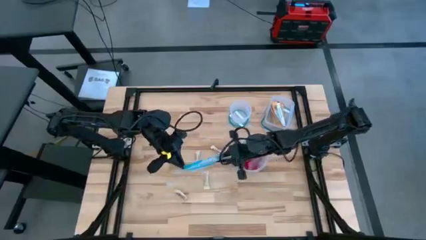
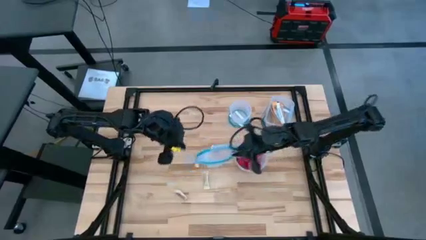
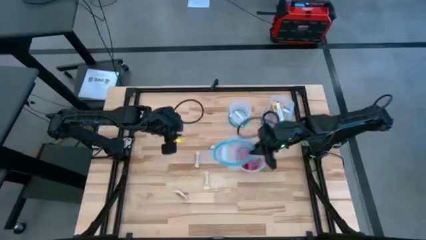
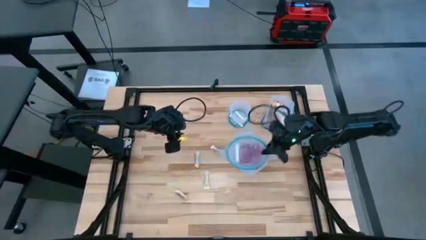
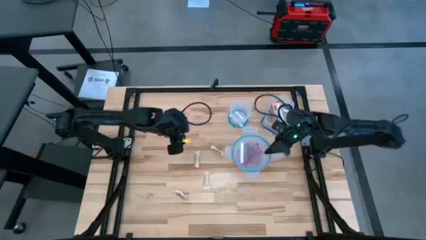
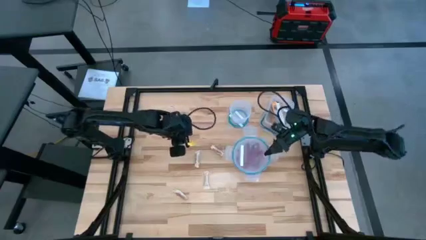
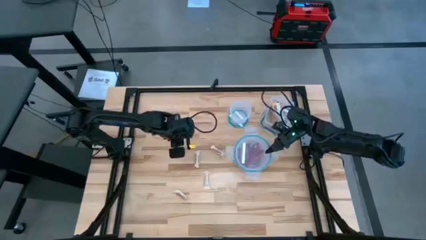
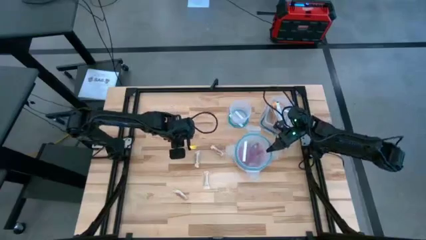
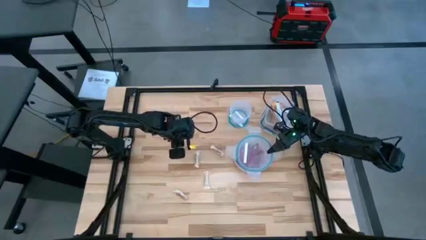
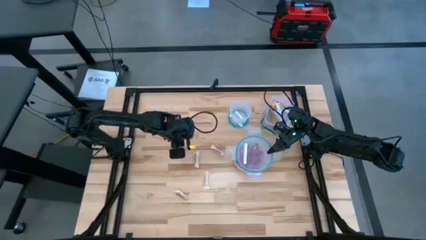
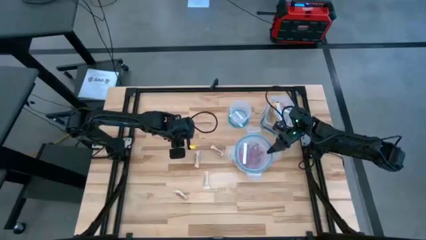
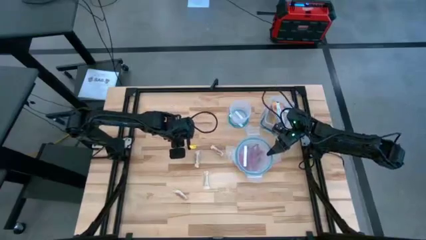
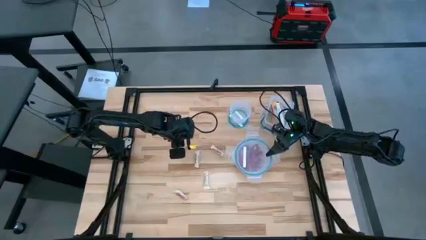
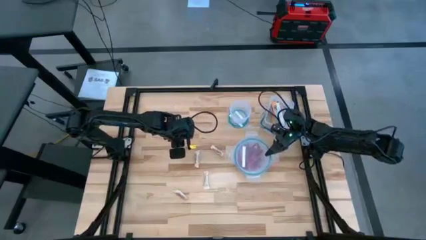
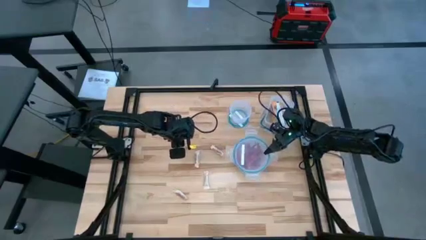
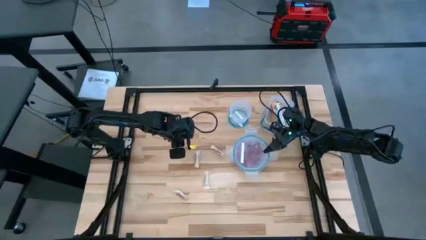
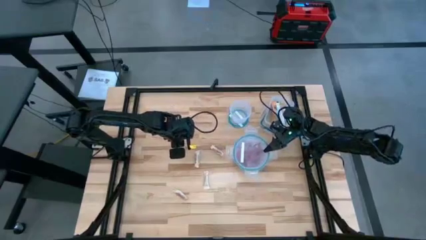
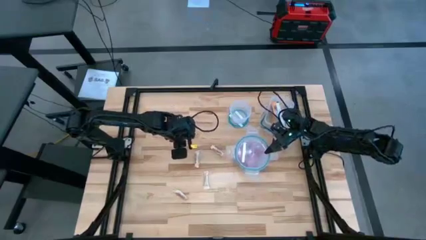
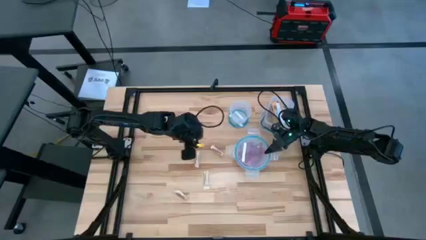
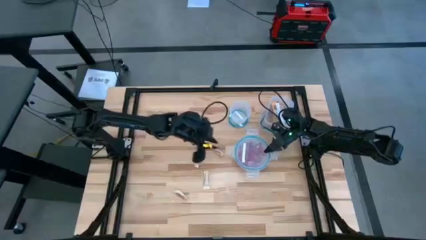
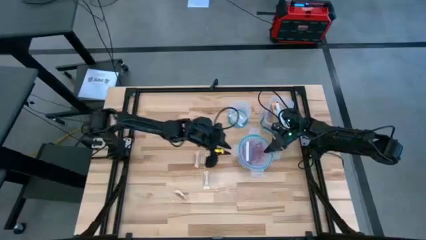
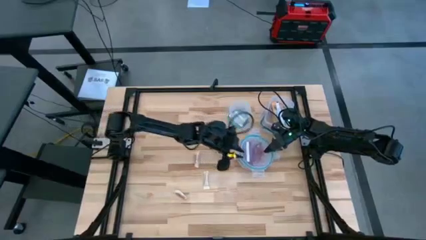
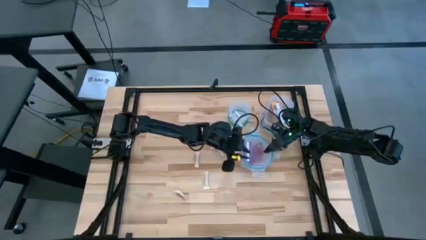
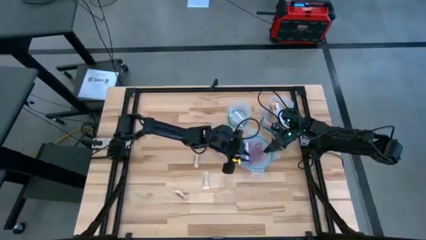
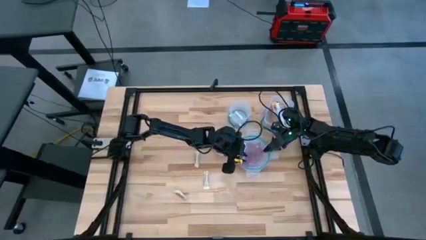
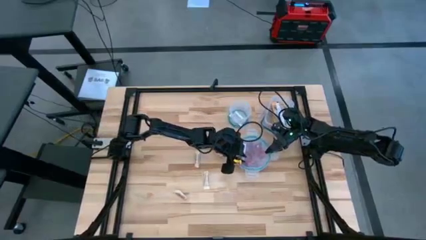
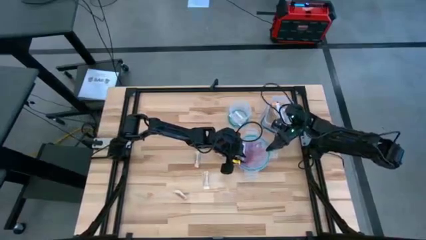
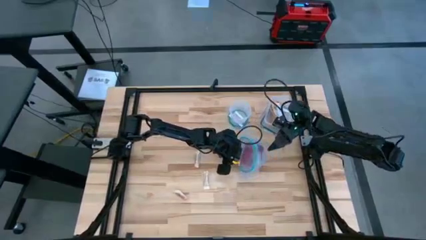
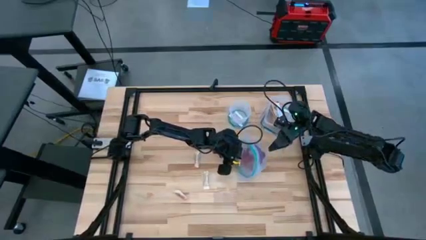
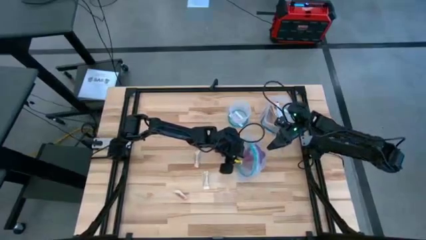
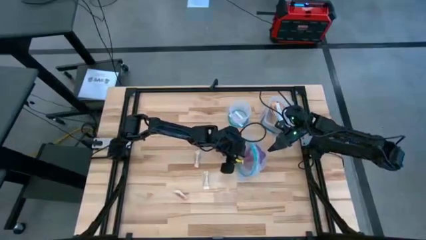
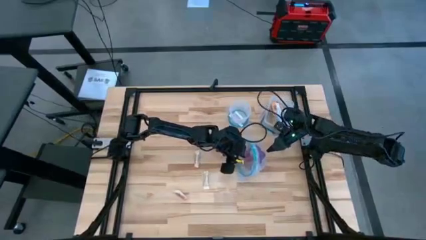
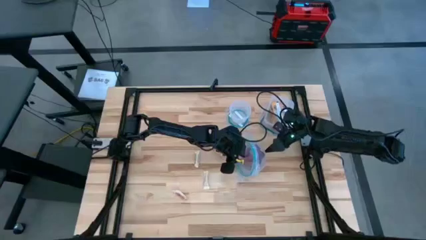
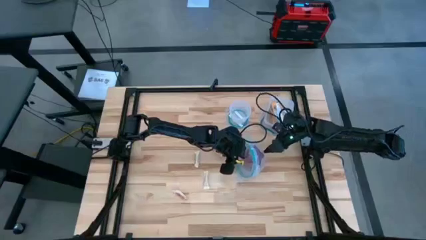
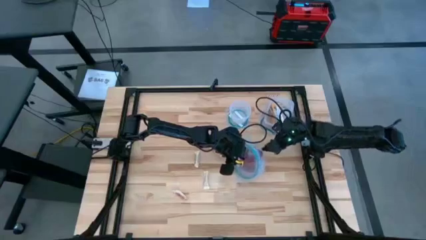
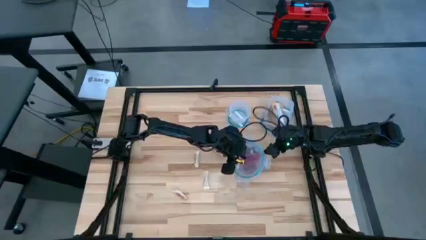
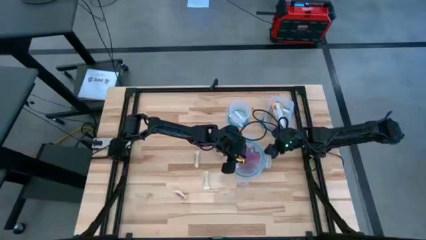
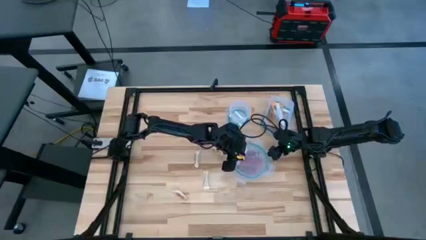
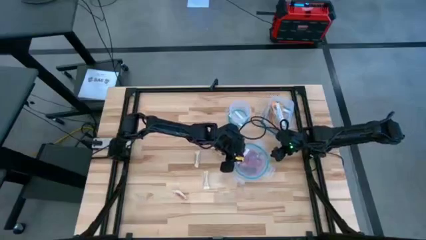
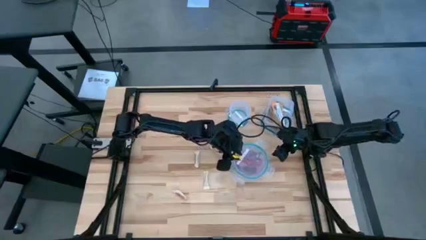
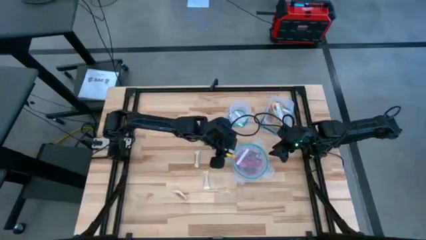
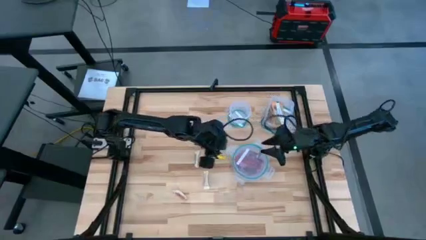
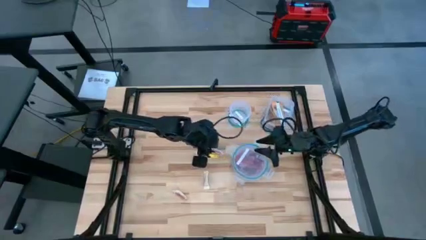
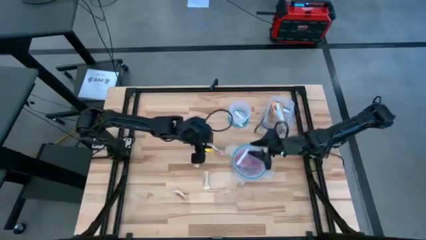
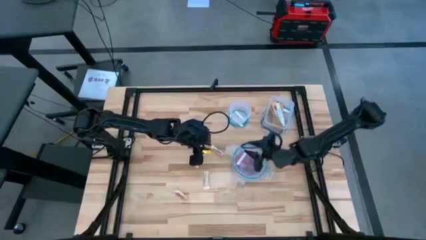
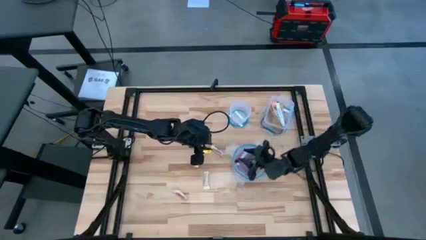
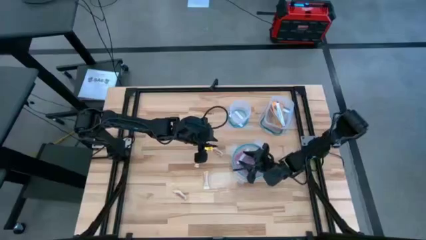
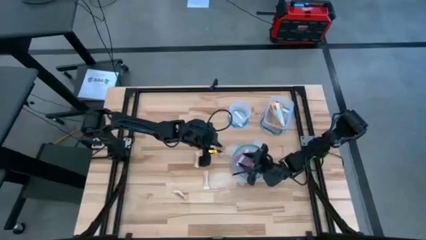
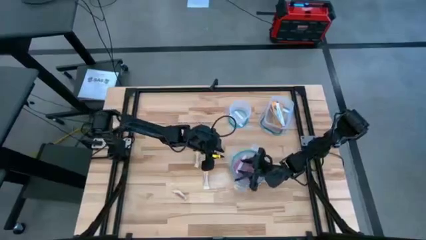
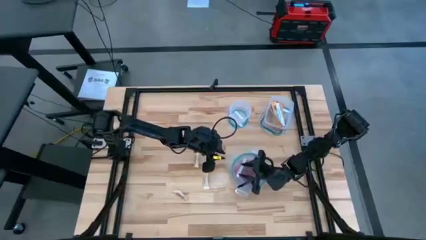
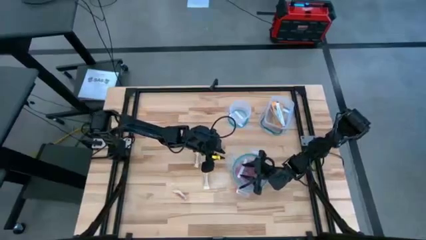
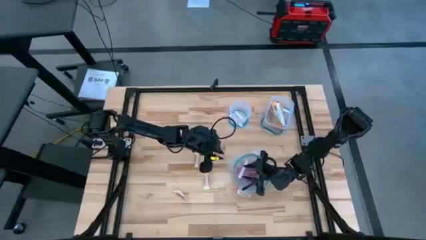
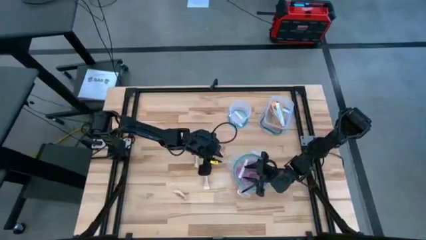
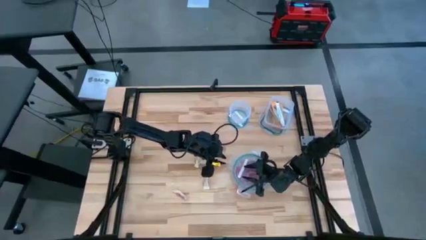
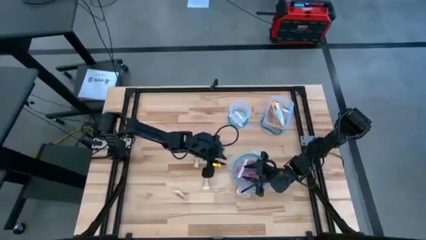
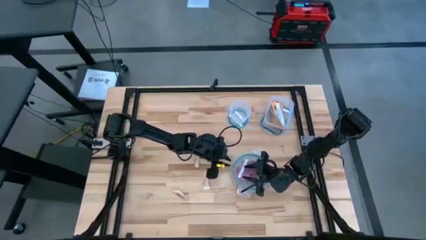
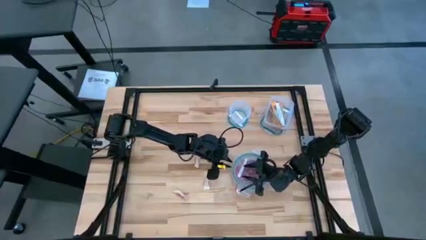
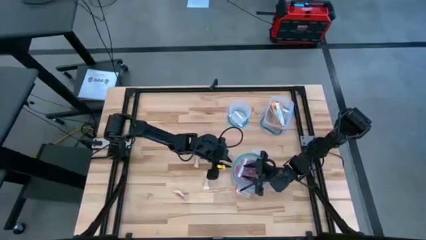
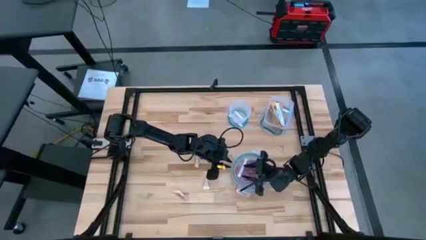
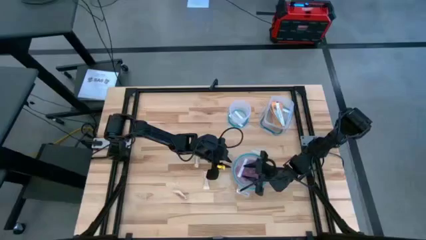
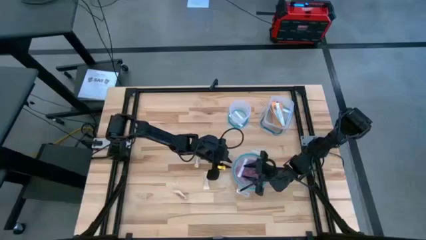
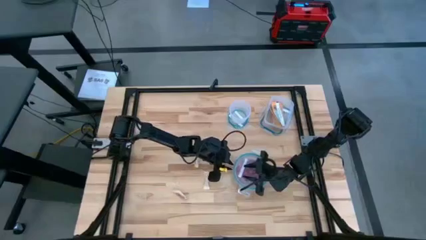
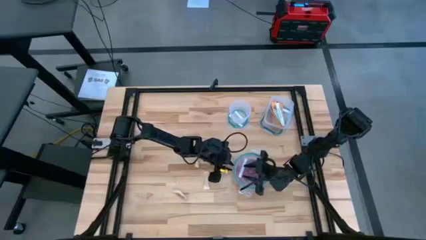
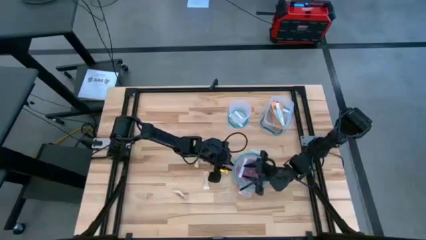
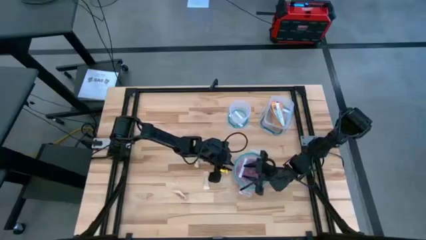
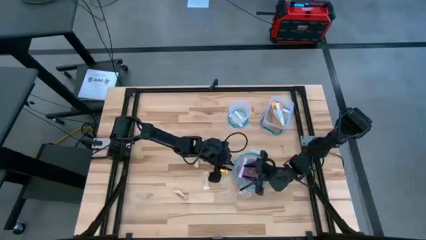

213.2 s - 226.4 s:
Task: Sort candy
Close the big round transparent bin

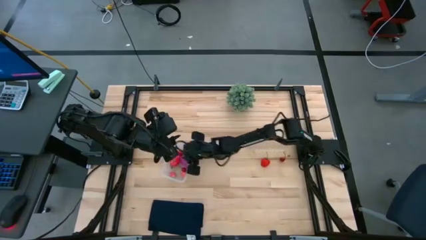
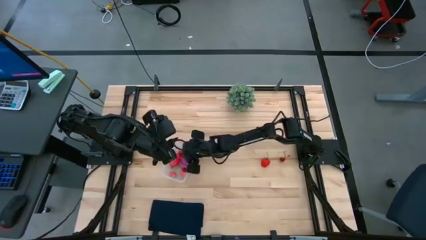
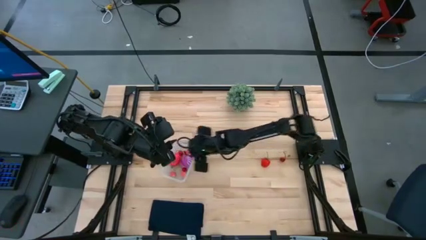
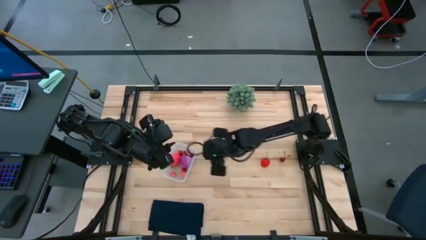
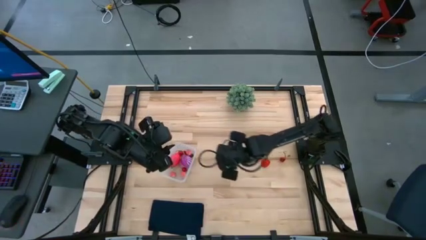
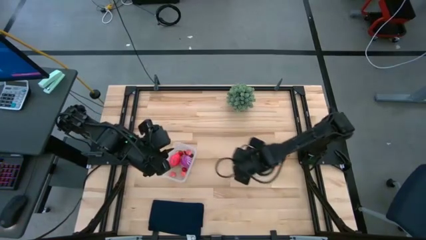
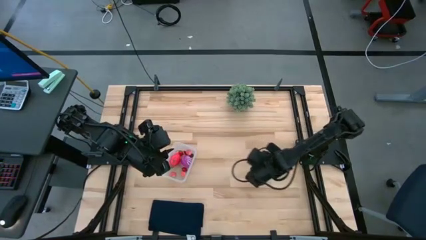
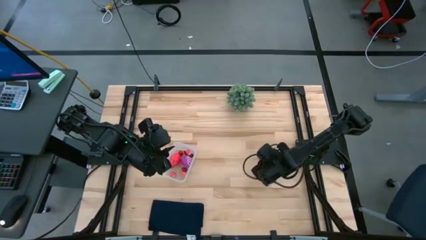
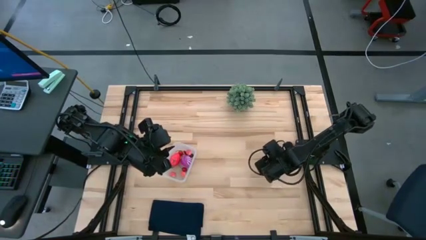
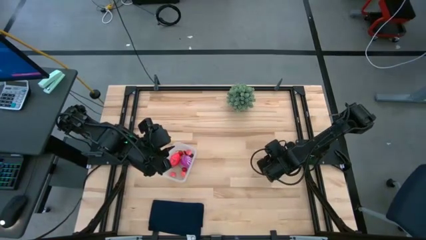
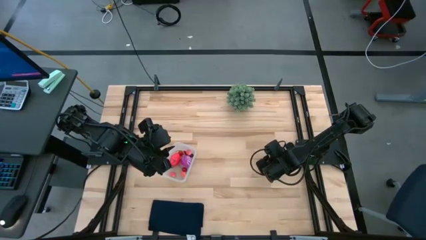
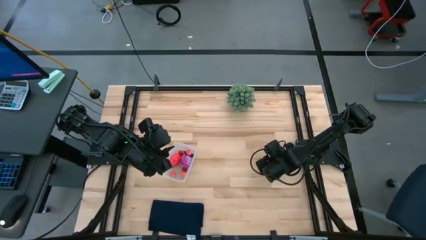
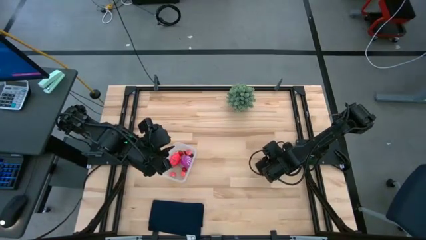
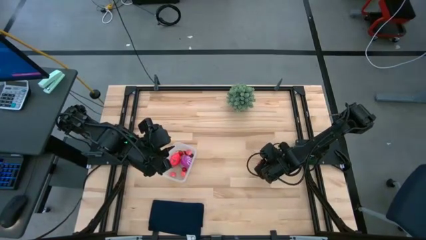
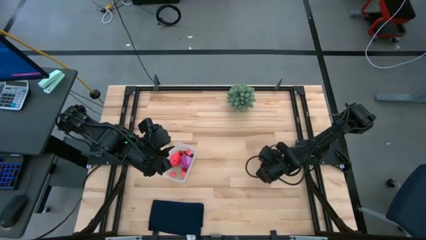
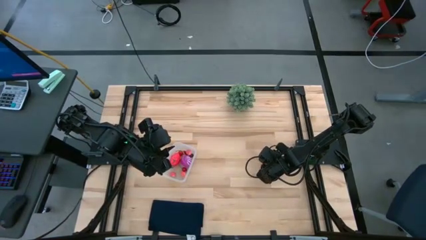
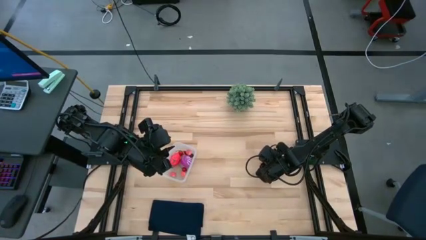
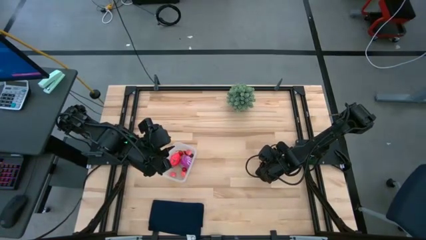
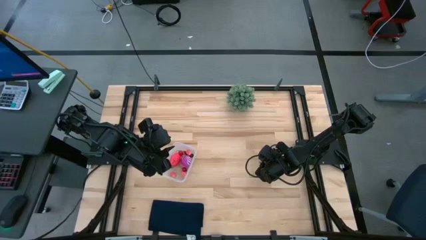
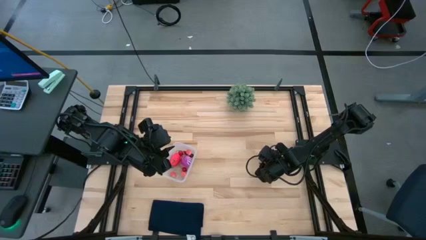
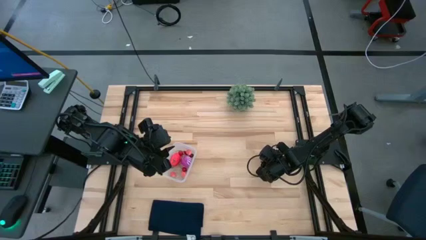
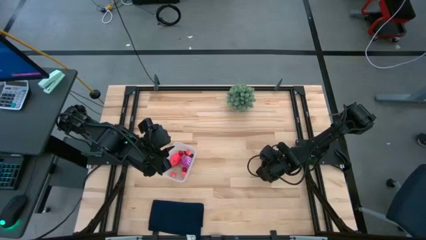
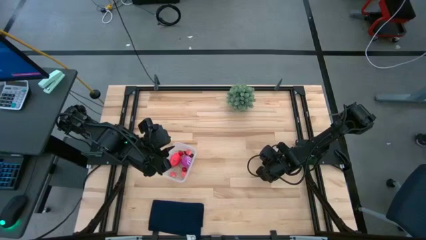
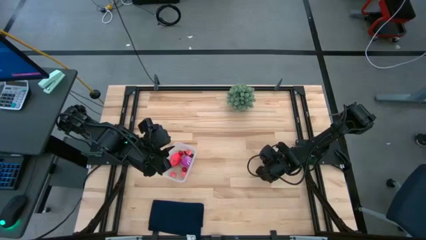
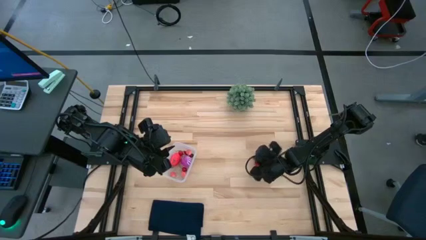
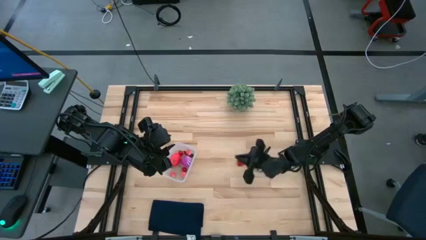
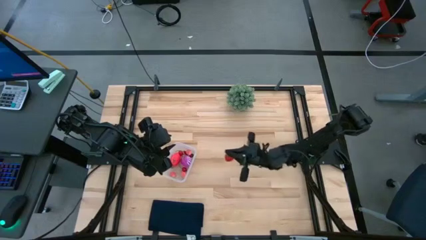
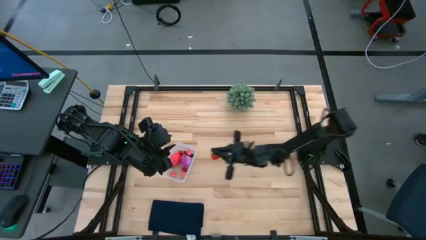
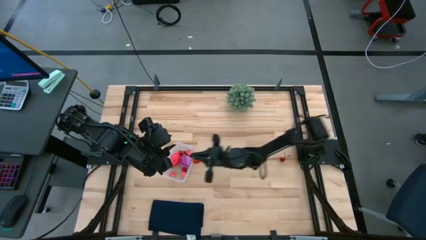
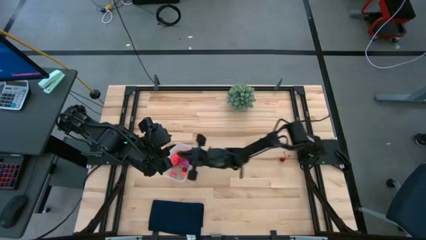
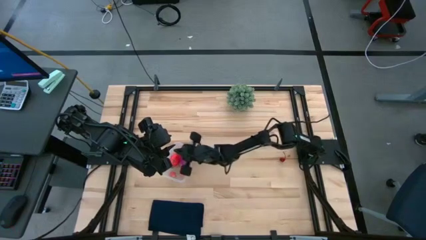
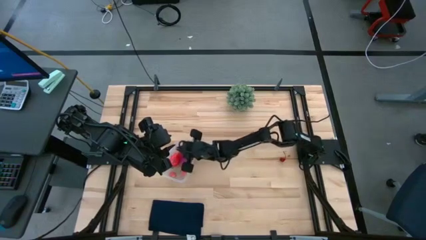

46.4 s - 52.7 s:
Task: Pick and placing Produce into tupperware
Put the red strawberry into the transparent bin
